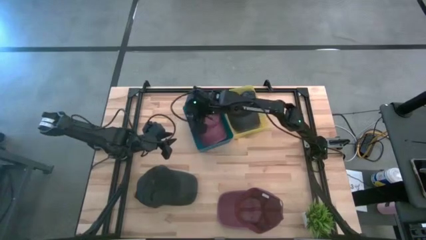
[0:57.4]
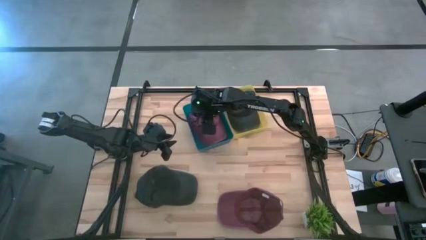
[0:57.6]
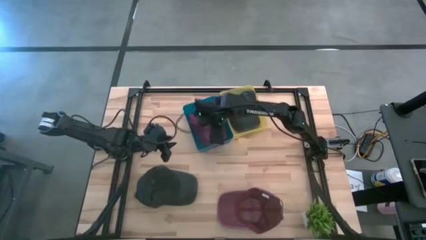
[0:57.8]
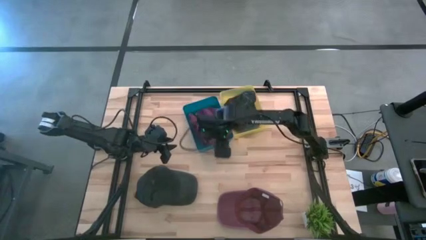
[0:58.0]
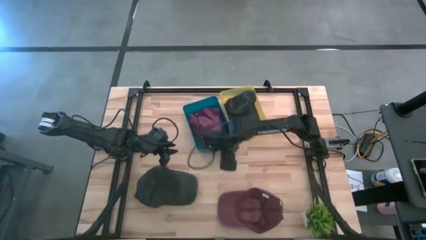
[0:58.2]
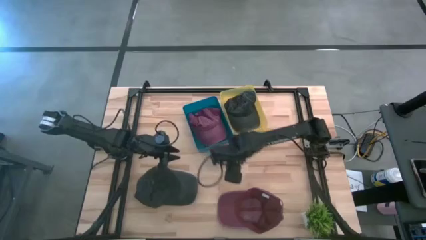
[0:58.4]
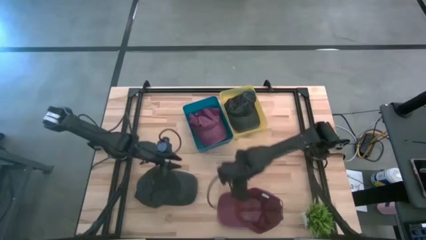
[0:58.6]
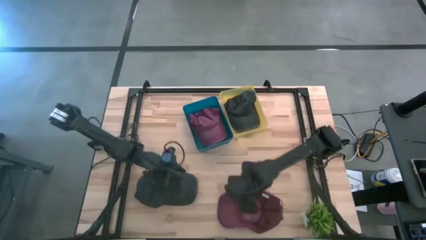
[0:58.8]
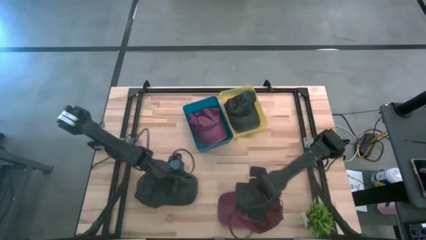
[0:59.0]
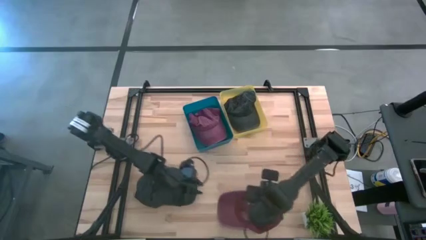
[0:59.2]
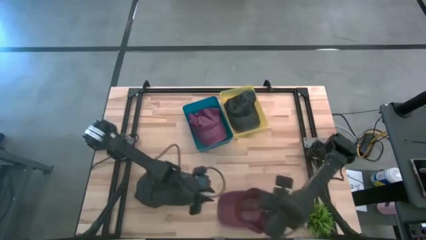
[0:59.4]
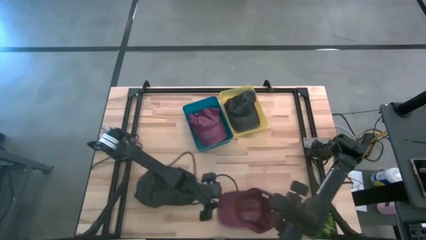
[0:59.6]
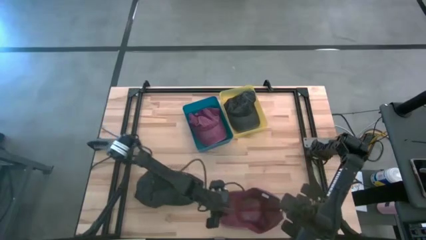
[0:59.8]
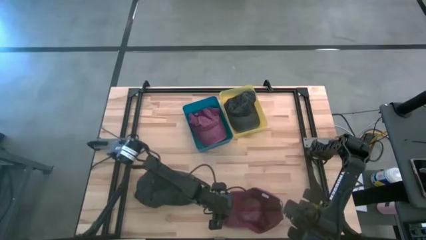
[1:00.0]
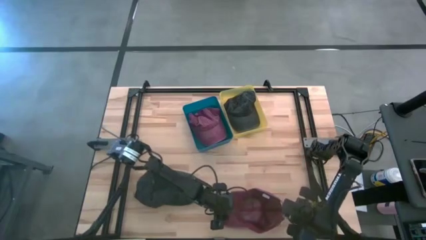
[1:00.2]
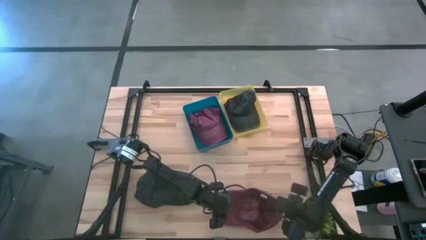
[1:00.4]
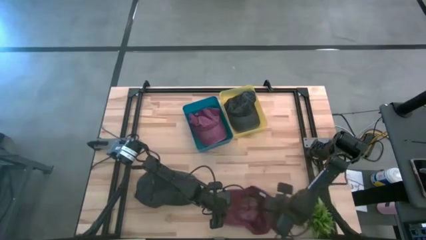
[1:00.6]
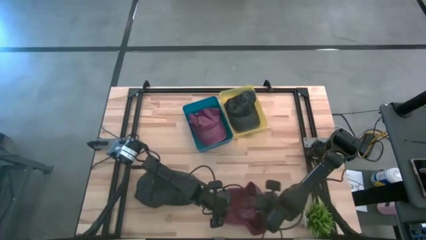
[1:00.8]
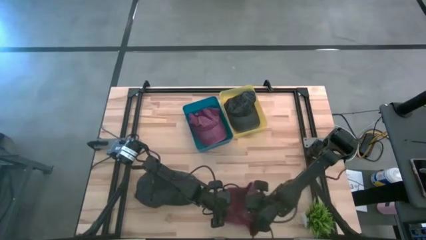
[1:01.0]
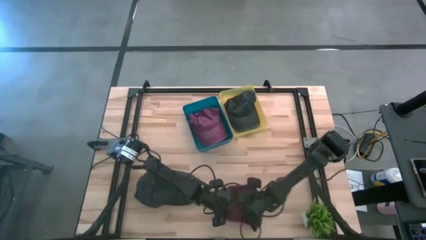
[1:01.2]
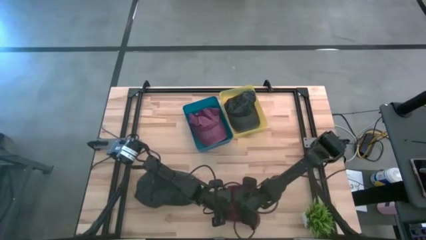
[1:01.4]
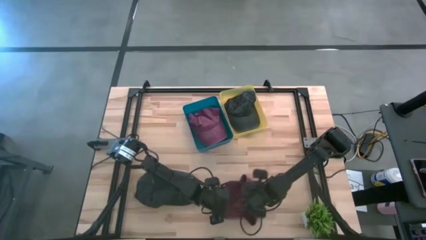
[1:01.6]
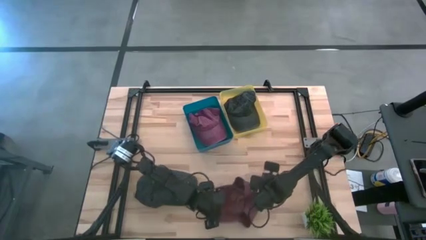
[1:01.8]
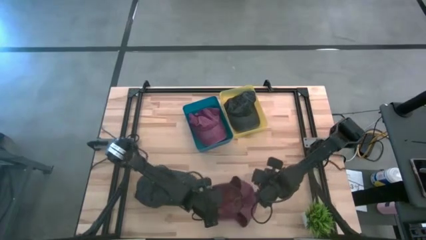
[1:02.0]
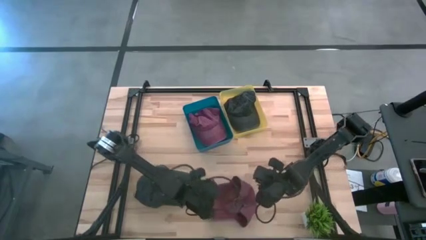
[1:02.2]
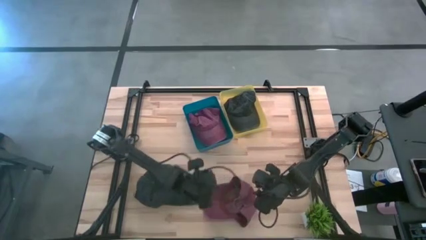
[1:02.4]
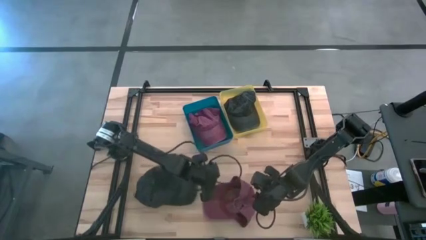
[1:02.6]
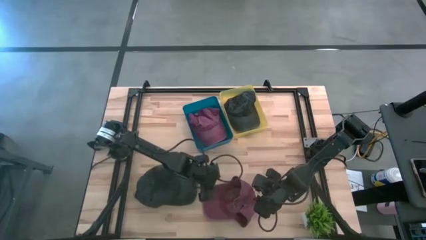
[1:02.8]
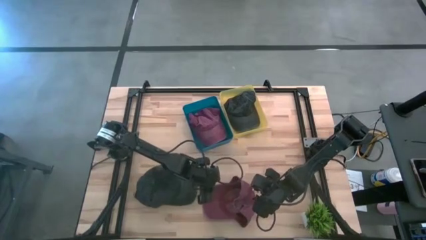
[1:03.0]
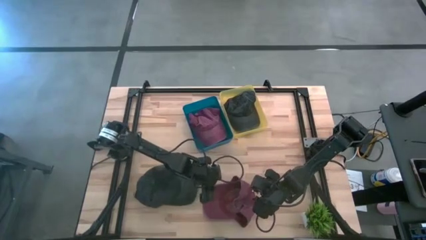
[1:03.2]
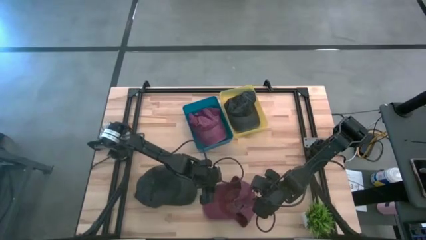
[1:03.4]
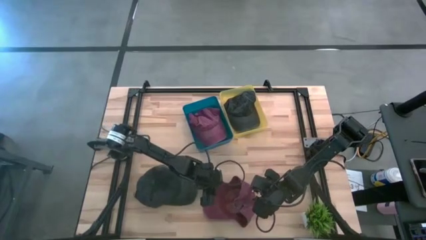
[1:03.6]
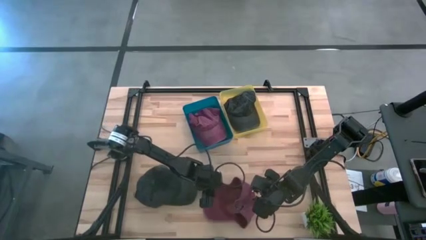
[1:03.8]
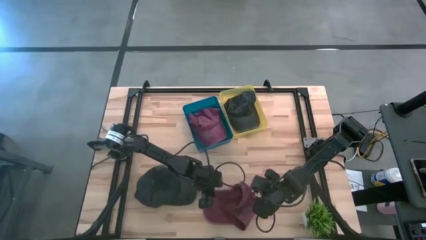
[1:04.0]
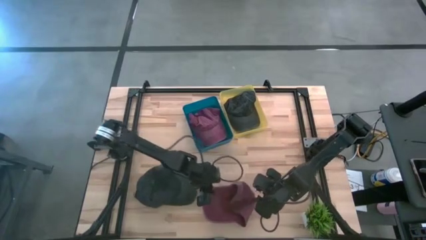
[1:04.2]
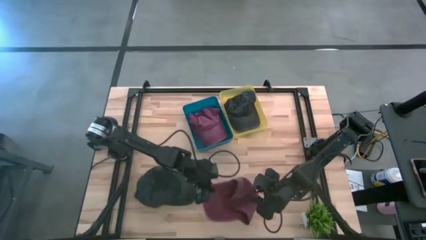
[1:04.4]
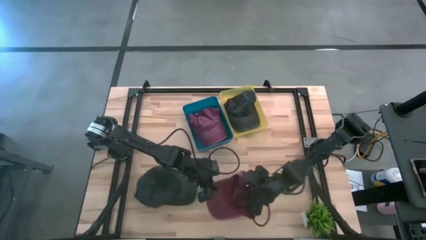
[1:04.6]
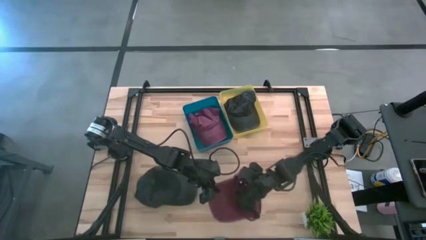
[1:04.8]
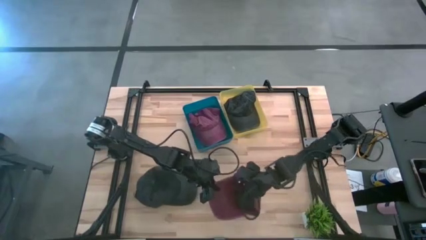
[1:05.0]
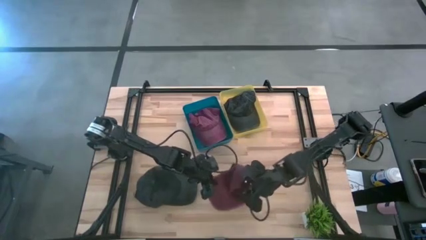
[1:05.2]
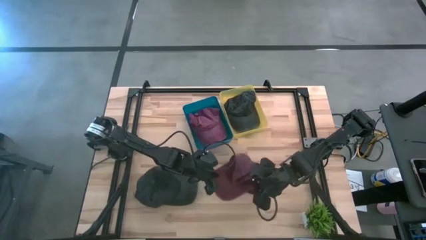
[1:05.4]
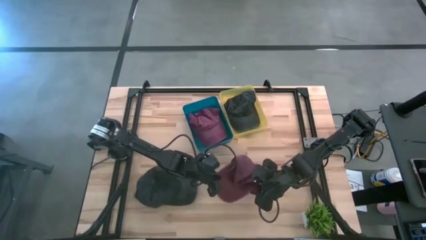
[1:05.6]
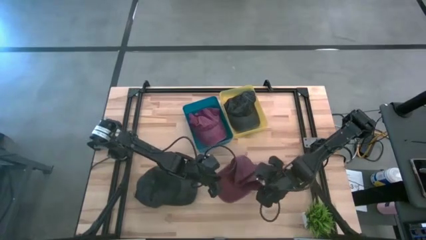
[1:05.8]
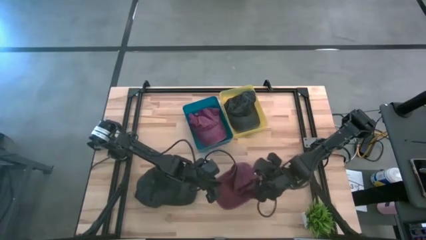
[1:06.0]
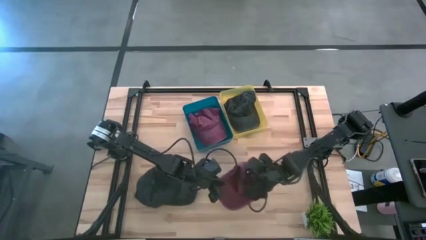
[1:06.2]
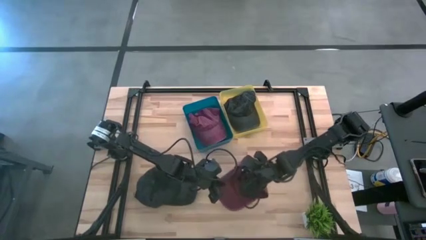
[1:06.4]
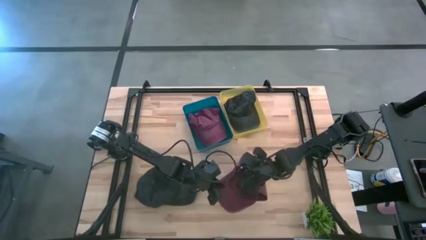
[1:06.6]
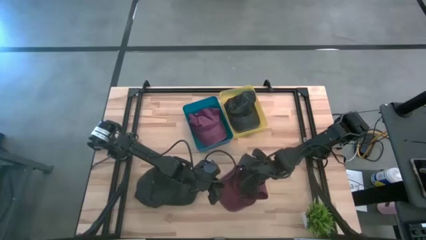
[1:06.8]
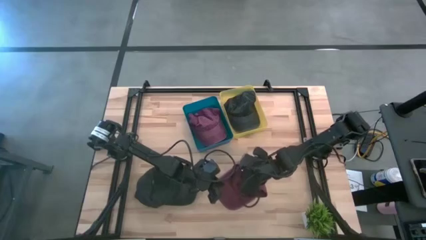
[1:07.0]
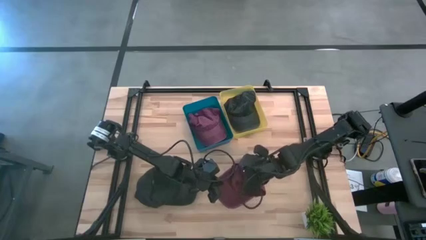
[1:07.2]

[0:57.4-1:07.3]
Task: Pick & Place hat
Put the red cap into the blue bin

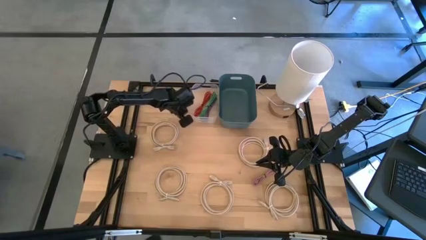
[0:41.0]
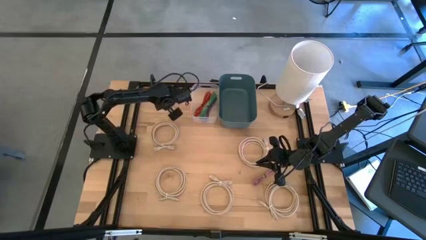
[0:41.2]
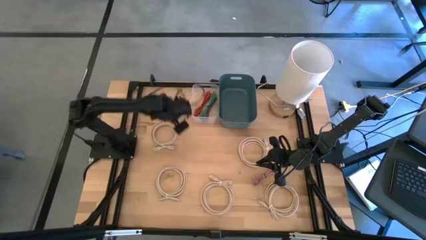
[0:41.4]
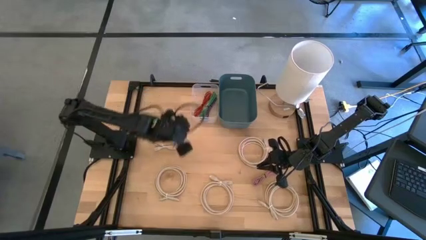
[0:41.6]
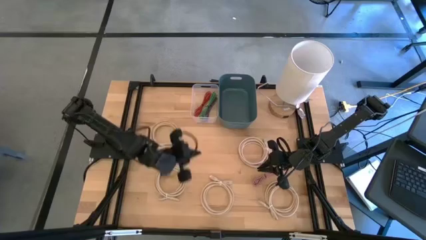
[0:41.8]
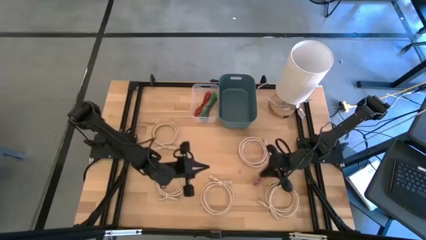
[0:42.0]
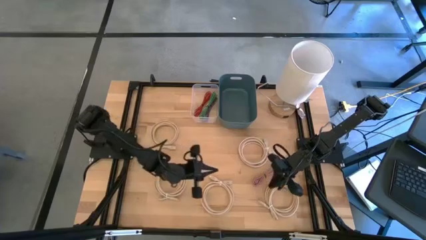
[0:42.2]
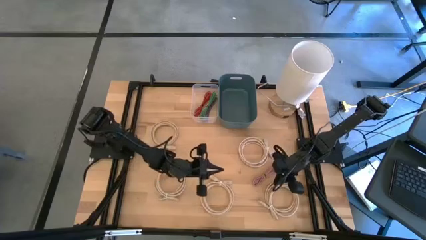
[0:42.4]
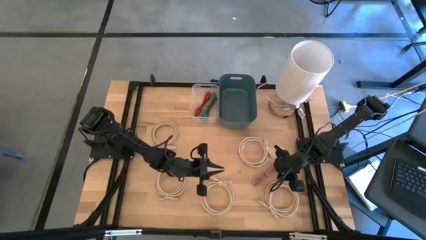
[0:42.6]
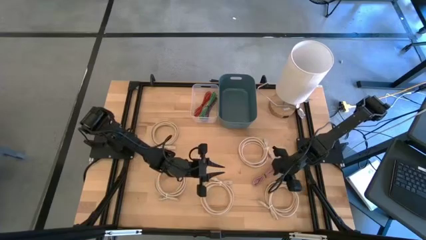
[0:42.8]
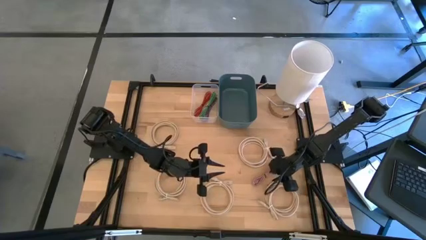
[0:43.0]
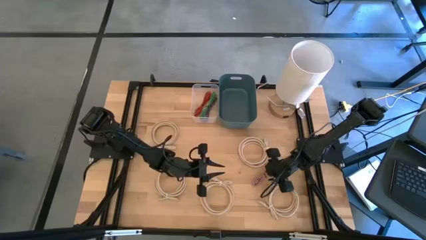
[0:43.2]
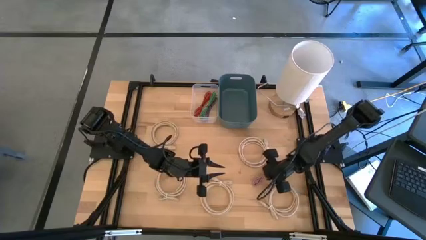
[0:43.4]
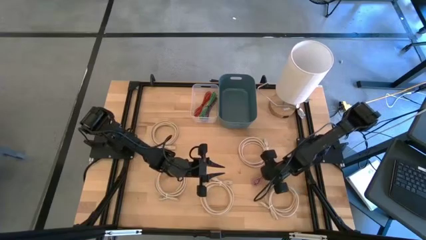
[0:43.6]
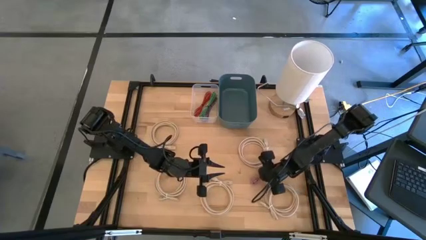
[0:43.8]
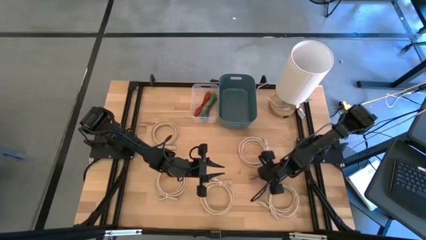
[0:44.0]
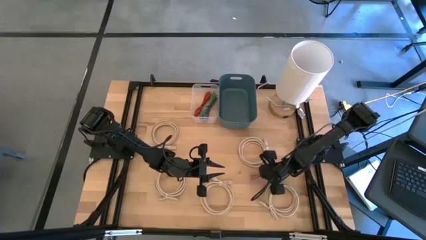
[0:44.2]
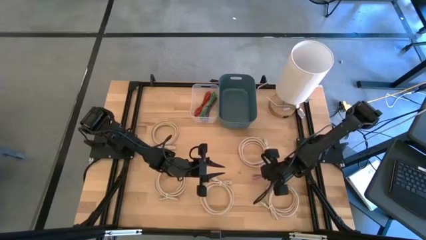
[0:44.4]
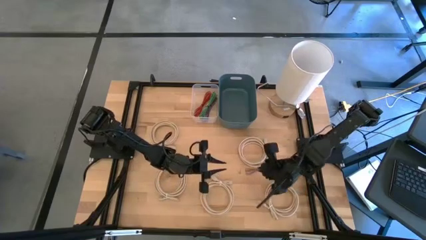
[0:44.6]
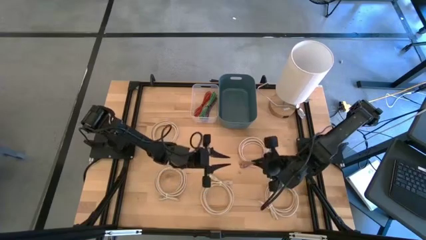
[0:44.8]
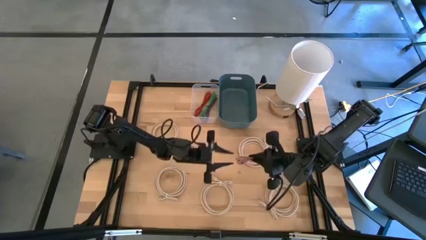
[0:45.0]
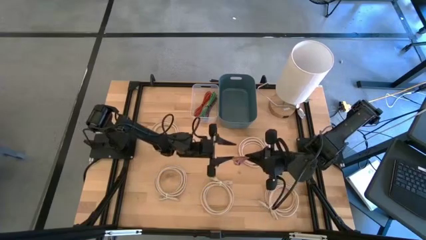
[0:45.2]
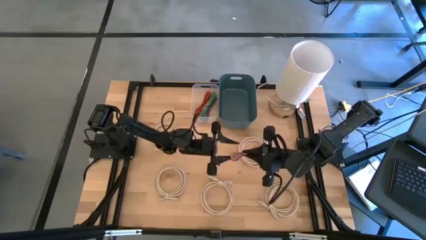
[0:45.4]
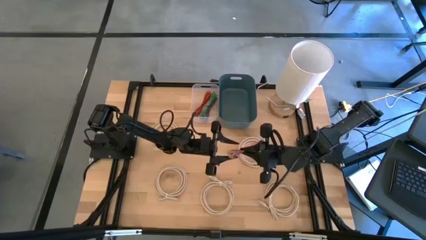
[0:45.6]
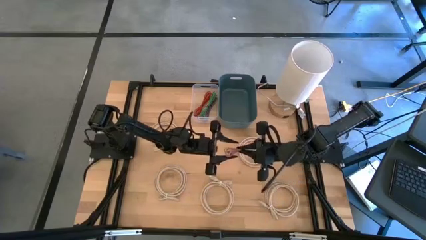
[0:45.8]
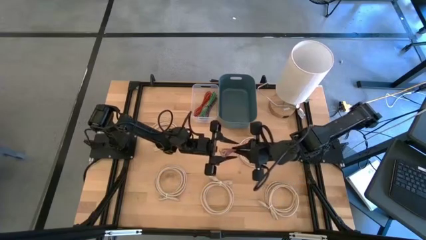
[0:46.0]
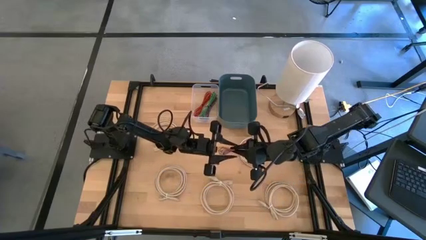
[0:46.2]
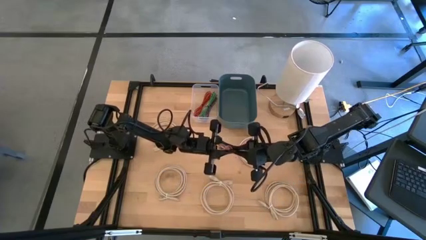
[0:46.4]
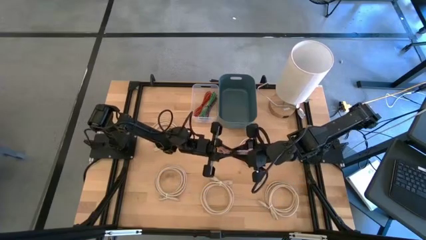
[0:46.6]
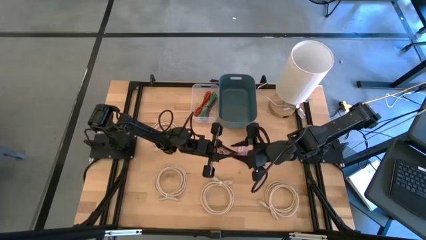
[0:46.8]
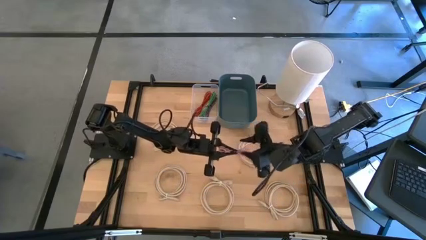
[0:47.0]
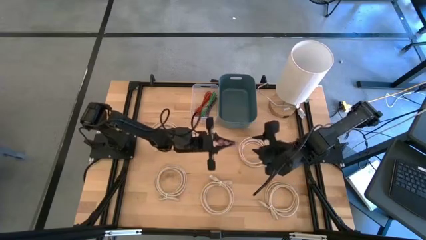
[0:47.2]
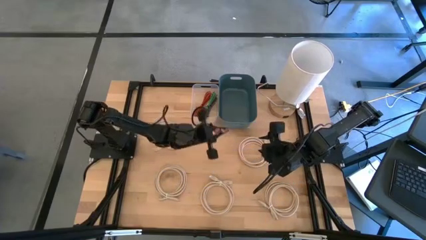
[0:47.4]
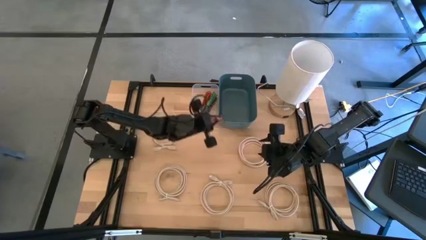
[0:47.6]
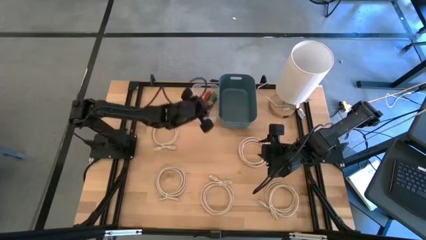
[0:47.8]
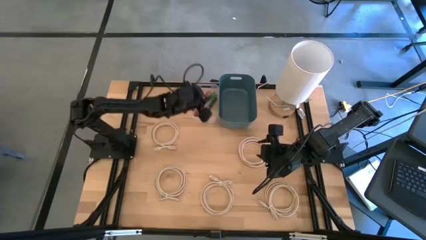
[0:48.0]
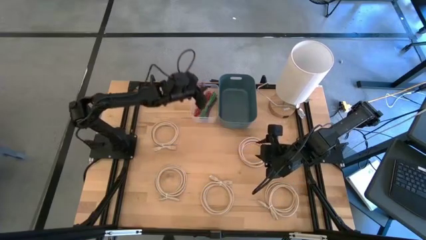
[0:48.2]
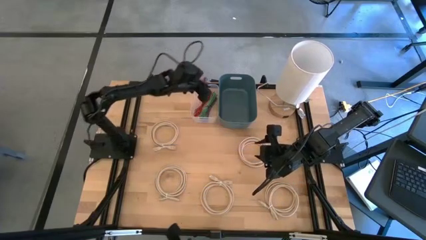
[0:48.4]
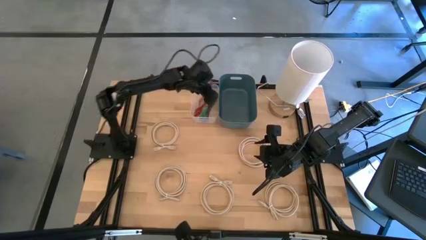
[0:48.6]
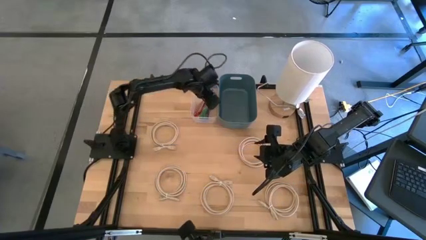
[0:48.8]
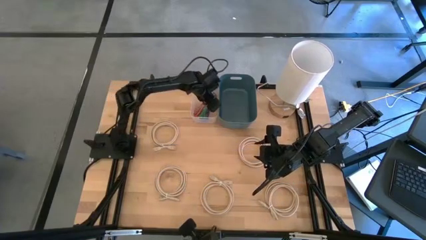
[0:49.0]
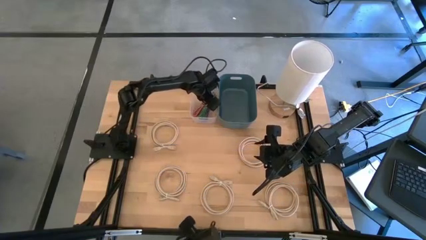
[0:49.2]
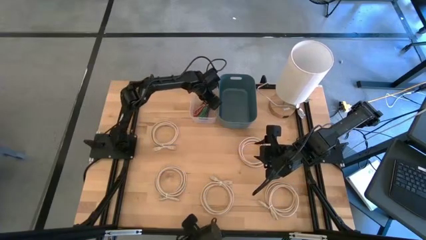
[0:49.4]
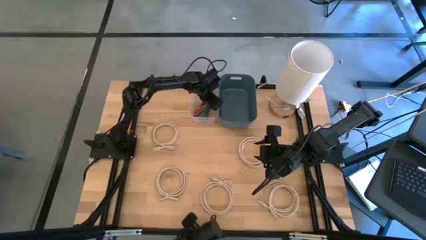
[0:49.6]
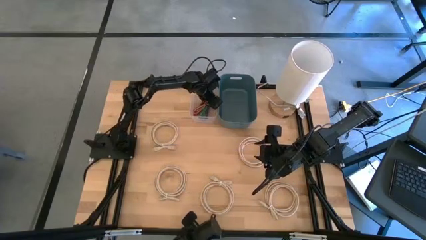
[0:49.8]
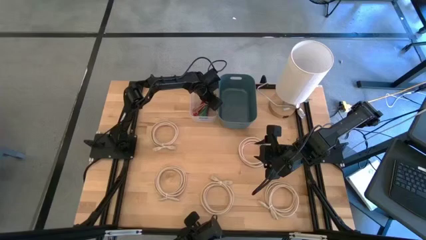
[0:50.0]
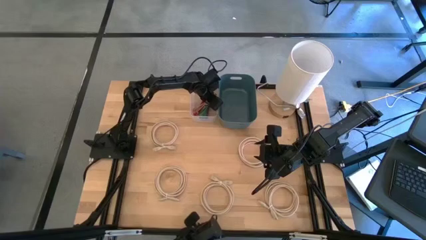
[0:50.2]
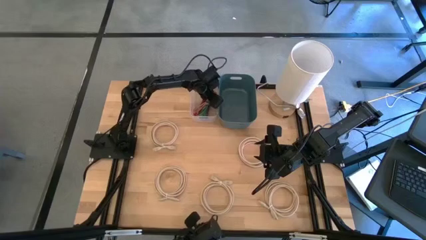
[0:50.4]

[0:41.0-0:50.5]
Task: Pick and place USB-C Cables
Put the pink USB cable into the transparent bin
